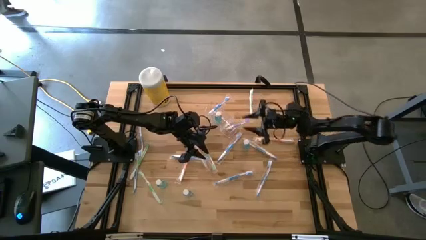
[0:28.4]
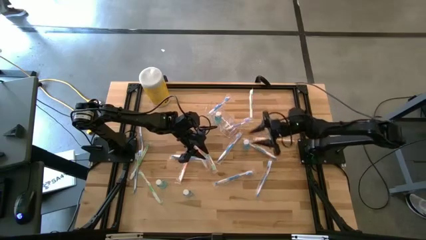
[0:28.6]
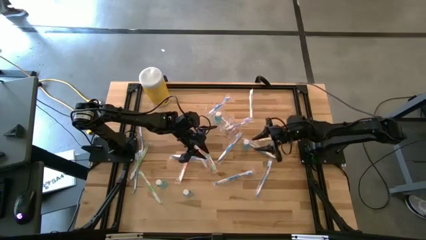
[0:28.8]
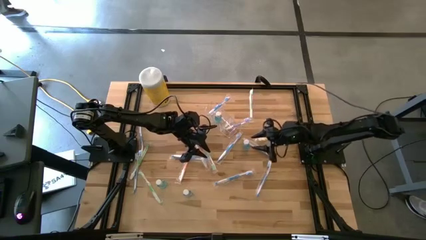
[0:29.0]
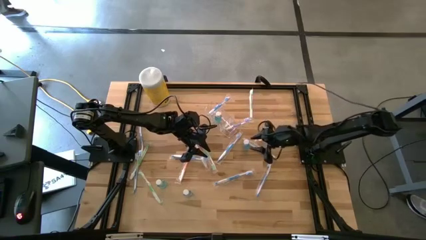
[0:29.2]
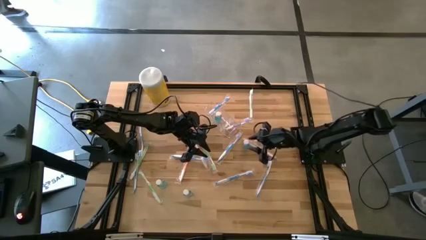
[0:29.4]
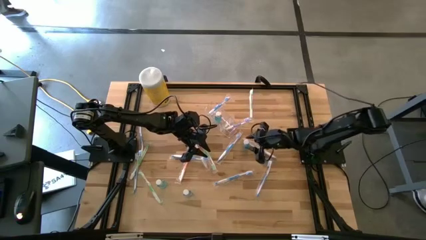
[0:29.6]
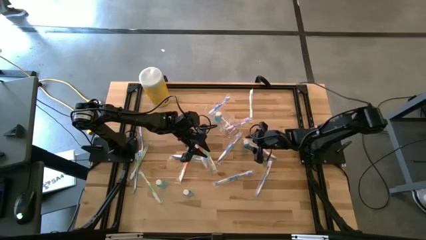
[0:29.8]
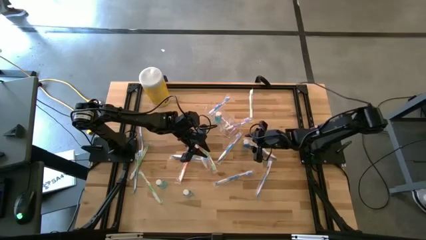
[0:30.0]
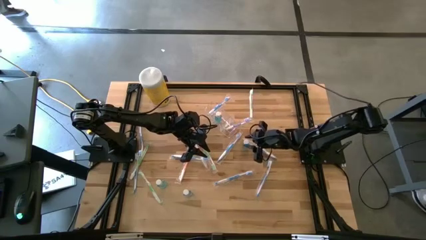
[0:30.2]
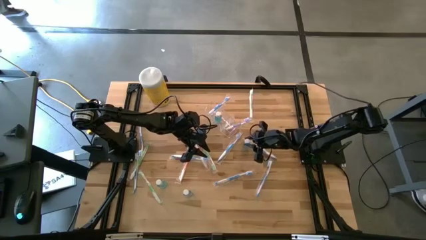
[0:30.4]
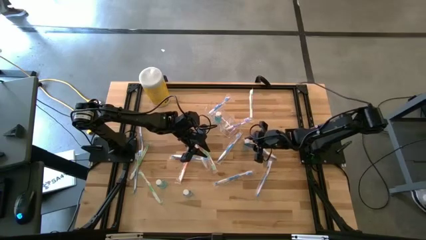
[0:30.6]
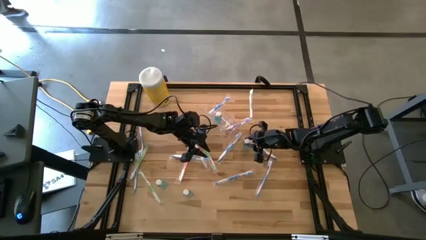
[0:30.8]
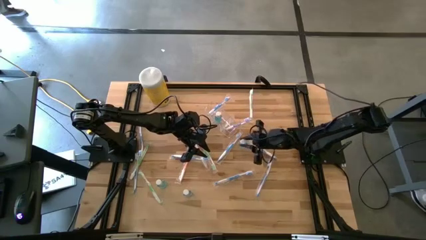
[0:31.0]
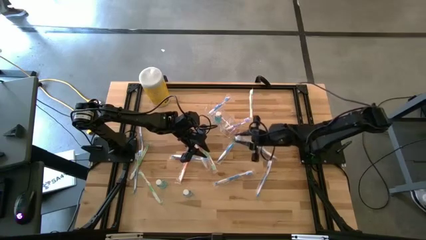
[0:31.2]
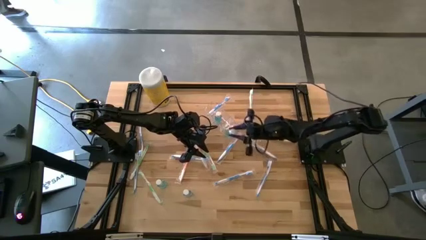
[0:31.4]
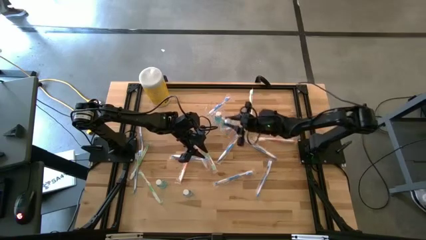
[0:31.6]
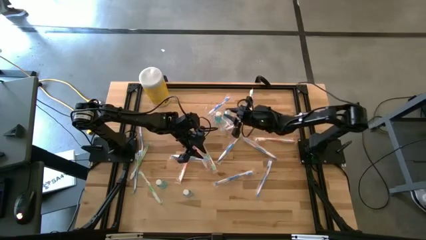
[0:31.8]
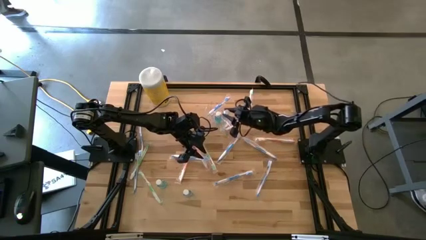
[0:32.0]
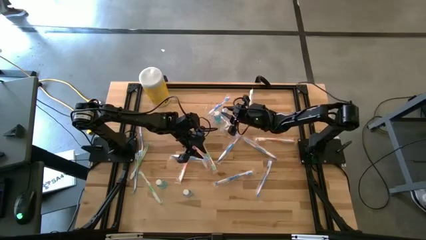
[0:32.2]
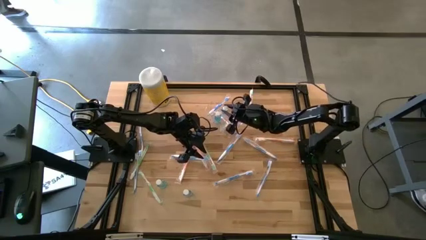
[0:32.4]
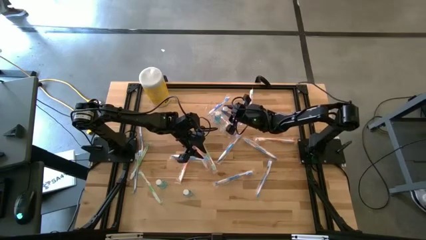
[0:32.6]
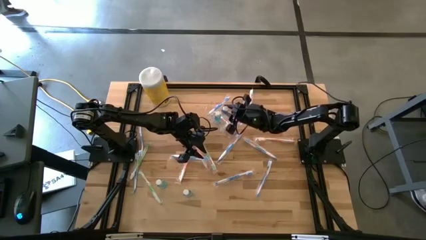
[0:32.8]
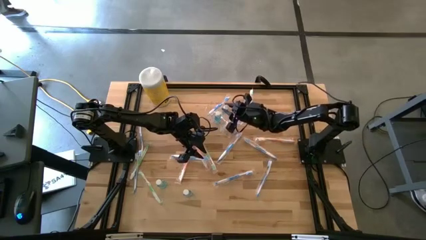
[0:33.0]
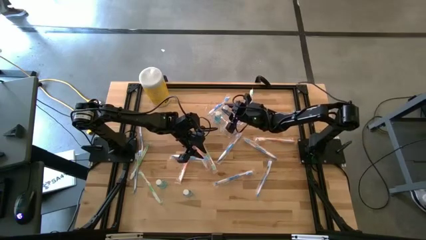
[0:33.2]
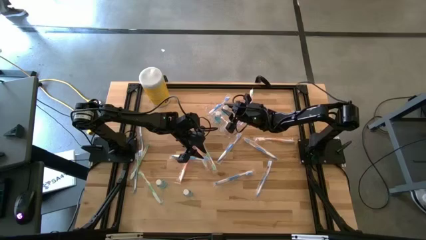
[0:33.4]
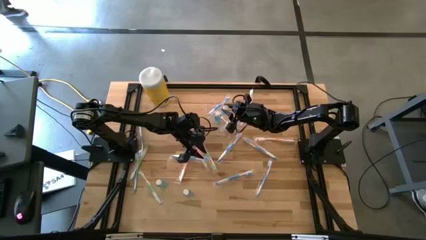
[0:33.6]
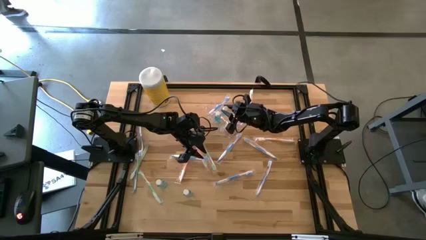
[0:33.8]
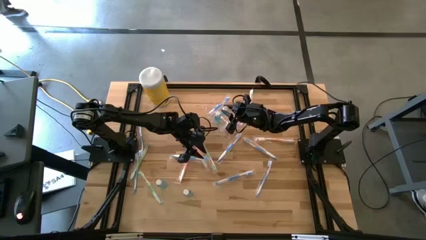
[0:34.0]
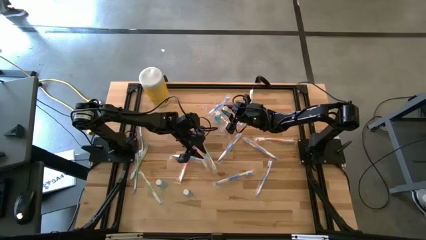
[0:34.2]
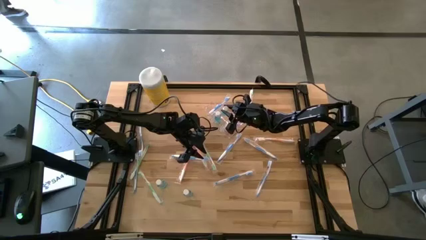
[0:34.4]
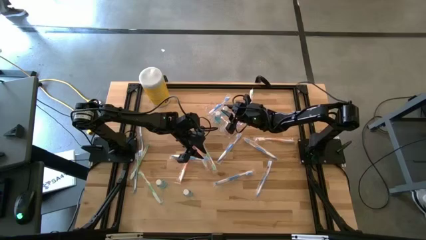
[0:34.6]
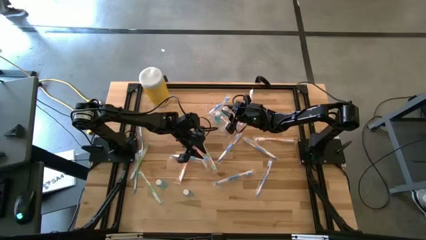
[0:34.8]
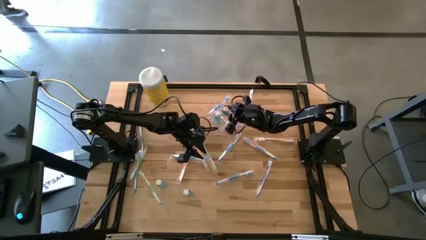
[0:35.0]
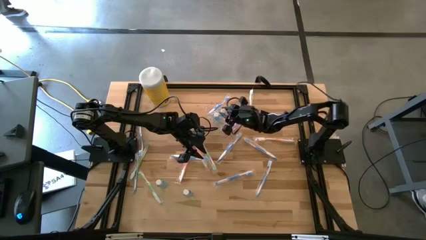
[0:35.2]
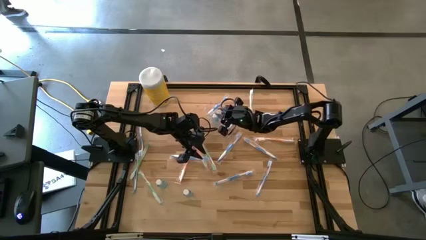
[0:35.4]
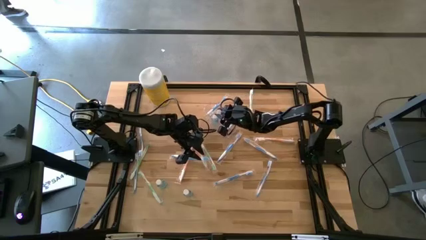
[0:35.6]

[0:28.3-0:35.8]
Task: Pick & Place toothbrushing station
Put the blue mouthwash into the transparent organizer

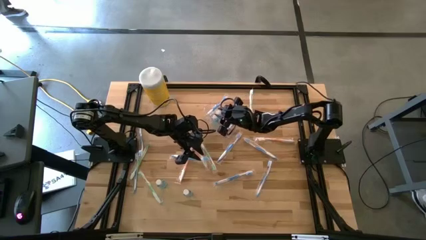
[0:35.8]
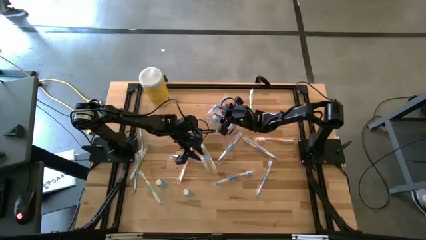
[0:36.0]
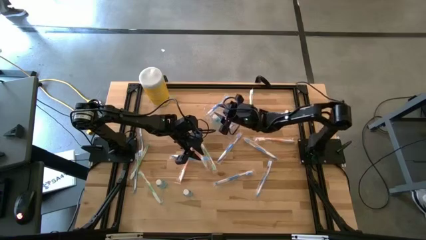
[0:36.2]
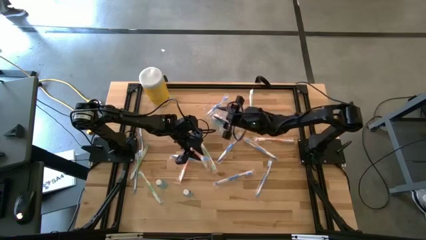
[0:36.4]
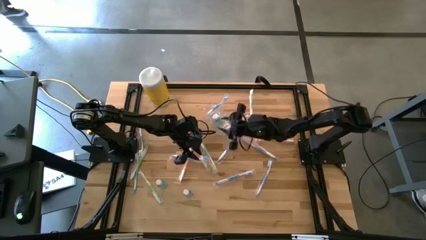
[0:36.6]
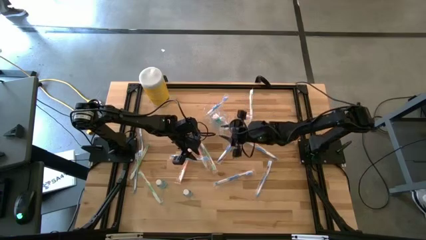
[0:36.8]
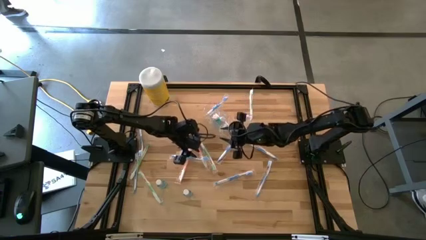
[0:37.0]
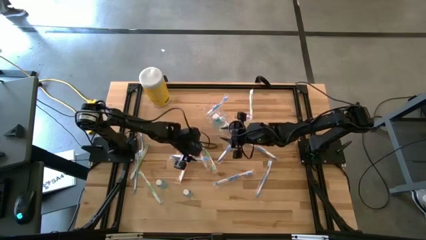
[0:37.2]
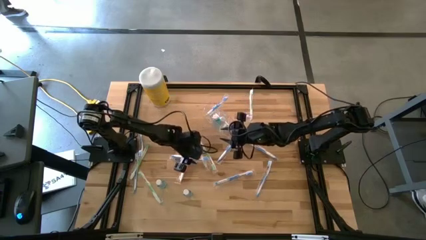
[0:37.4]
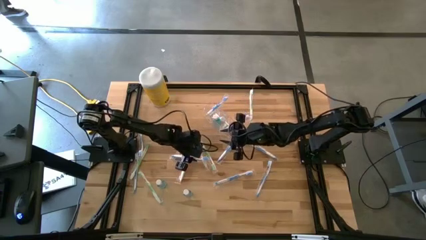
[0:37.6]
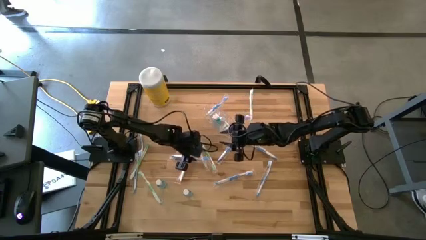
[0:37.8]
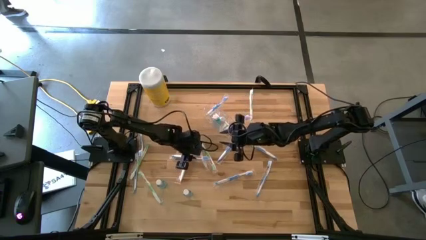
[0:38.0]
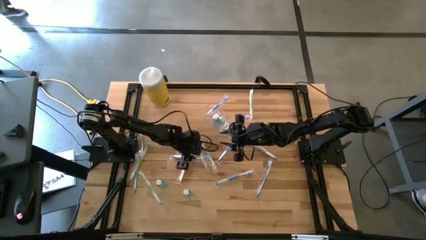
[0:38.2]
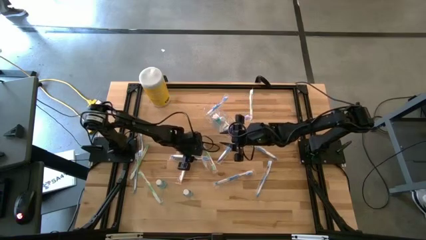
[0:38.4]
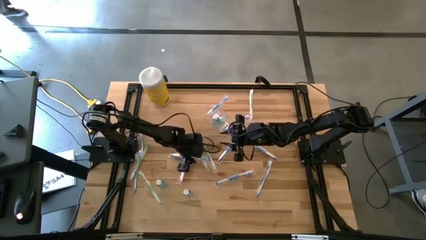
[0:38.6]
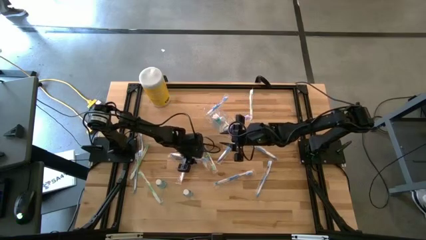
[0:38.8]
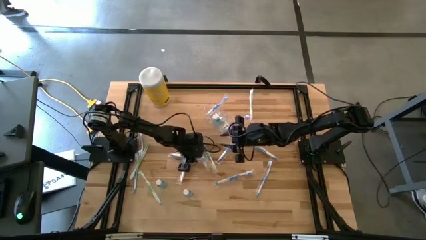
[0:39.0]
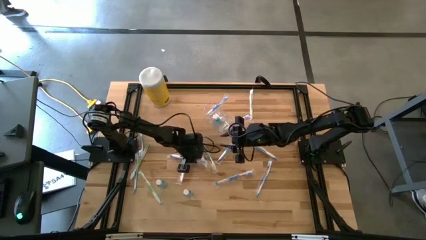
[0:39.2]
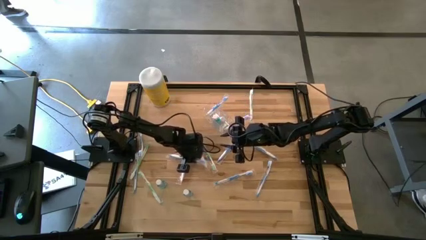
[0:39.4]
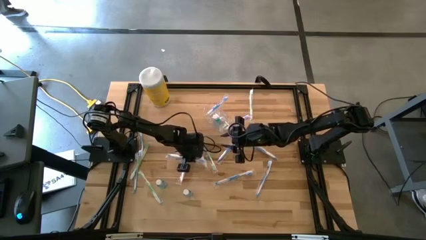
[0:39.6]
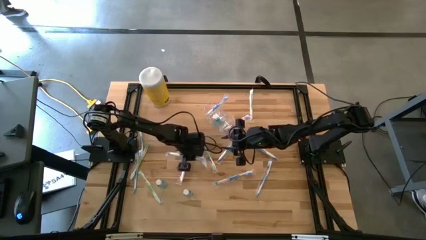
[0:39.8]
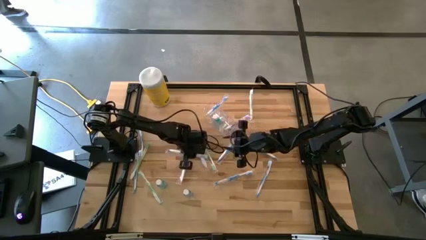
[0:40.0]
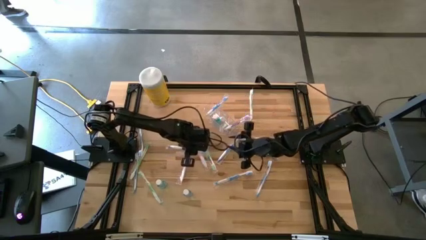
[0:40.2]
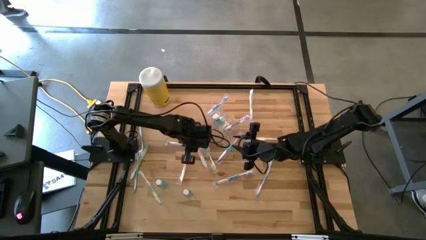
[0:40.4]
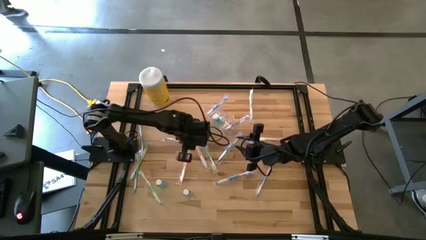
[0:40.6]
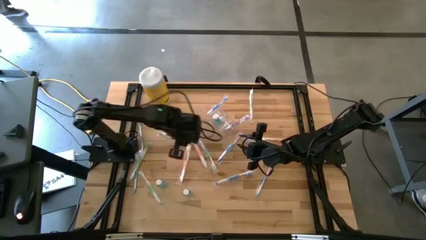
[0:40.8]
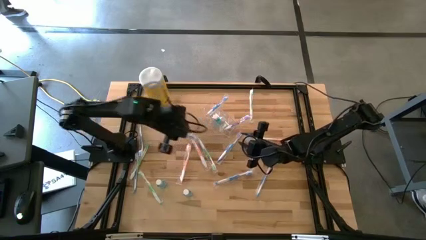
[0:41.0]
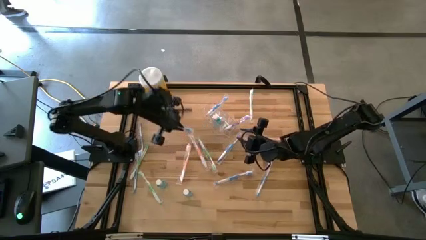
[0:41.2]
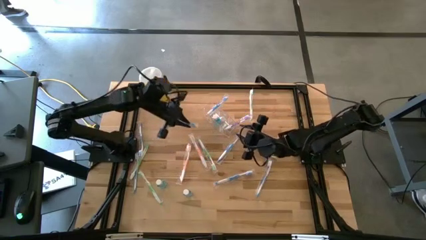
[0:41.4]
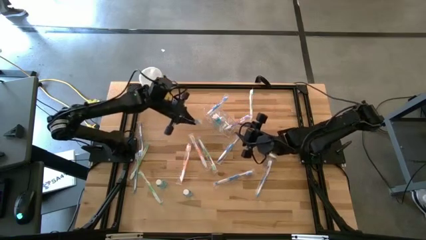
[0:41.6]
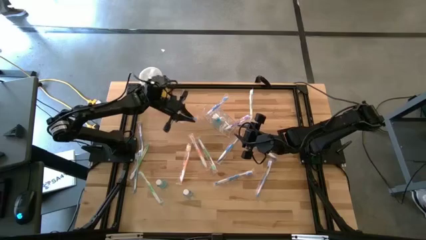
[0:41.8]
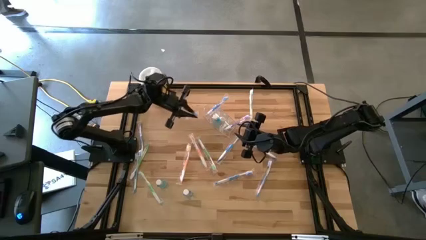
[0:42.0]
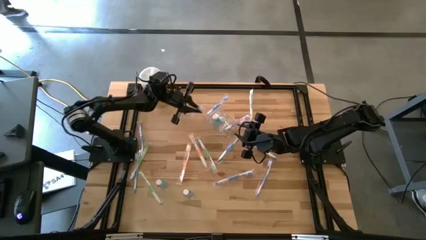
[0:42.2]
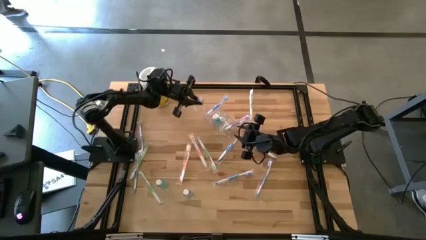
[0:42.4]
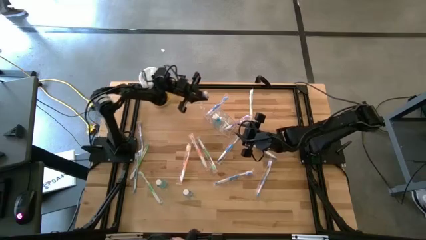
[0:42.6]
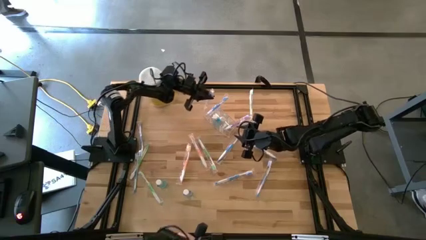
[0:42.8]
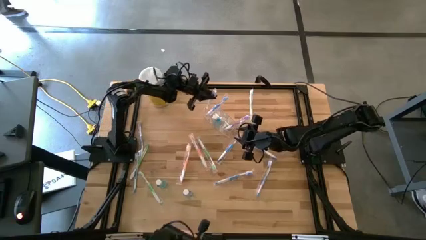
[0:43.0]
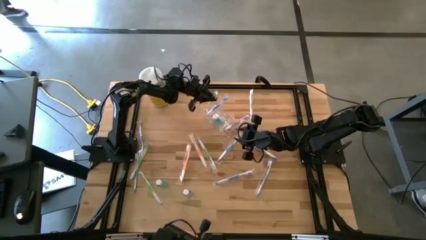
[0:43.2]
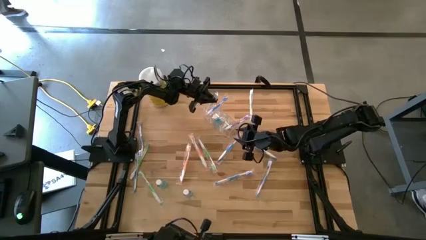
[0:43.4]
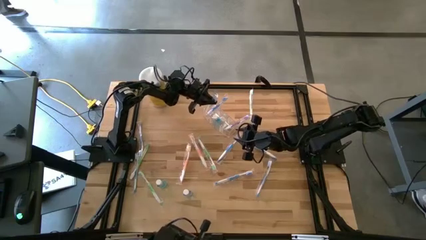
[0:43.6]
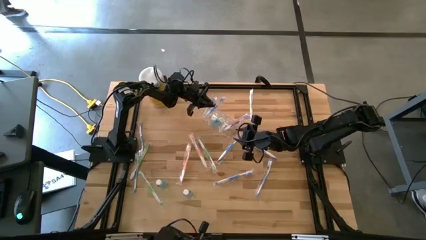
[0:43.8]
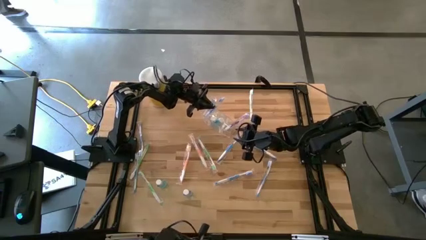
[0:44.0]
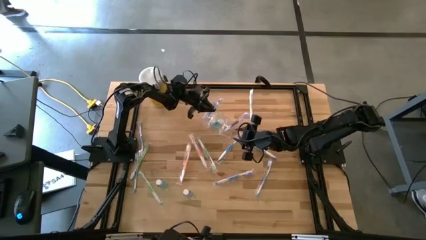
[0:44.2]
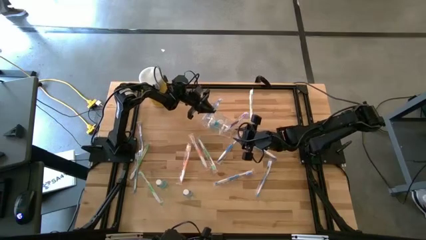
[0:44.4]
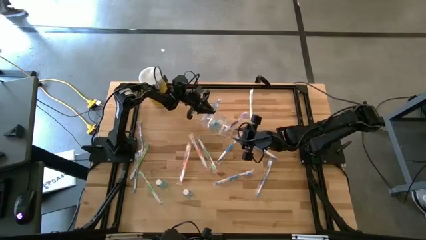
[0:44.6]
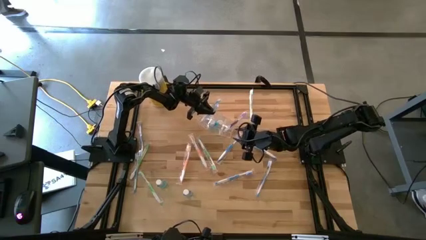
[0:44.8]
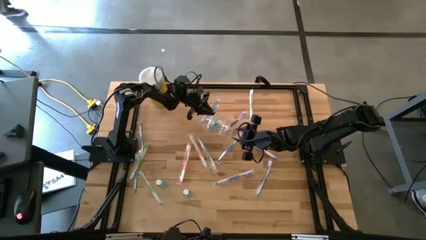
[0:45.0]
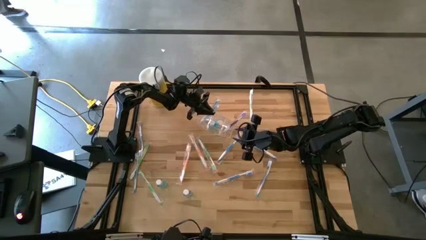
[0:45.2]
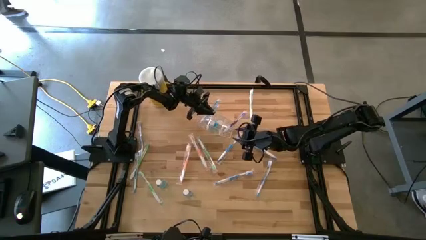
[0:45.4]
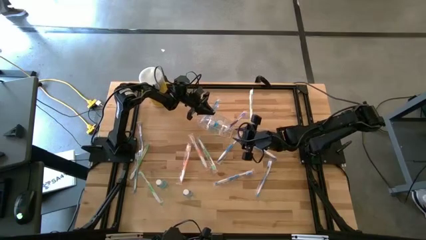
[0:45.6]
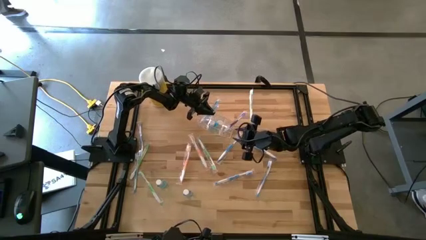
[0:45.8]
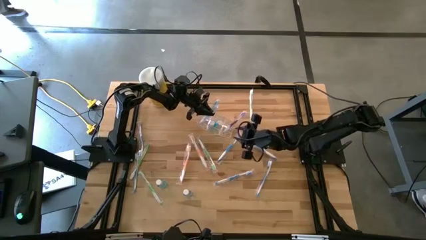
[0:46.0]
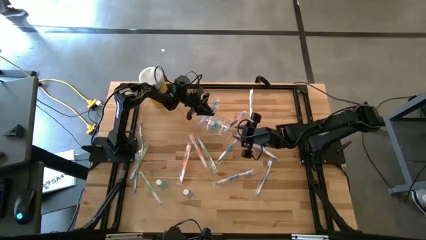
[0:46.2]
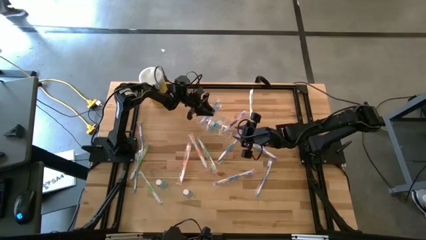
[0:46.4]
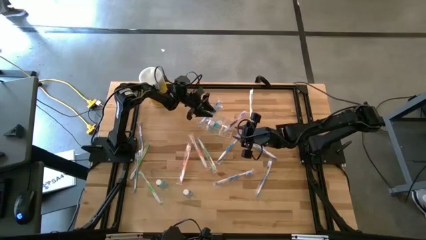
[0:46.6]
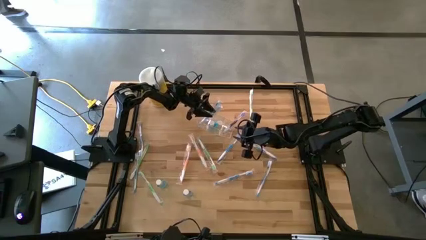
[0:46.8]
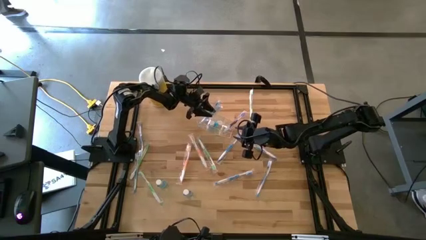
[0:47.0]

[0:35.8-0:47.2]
Put the blue toothbrush into the transparent organizer
